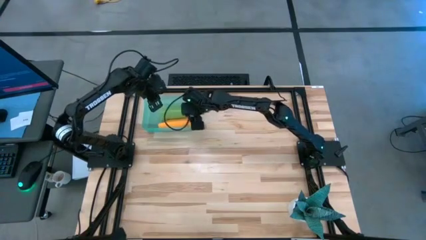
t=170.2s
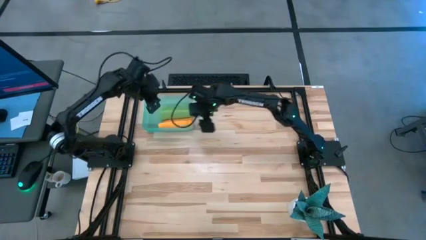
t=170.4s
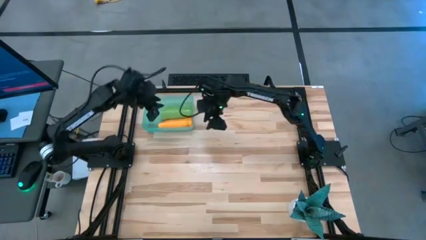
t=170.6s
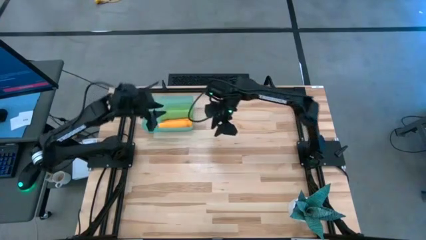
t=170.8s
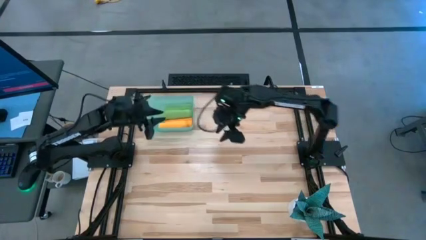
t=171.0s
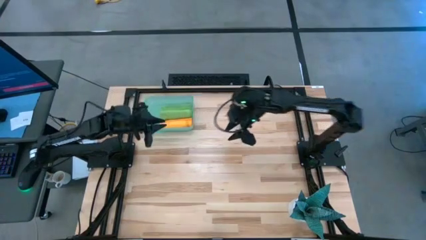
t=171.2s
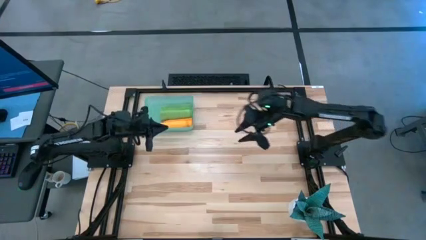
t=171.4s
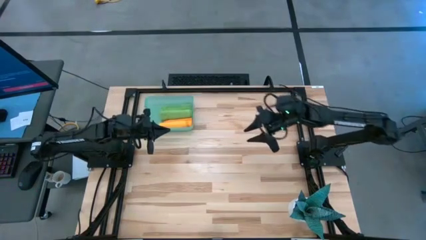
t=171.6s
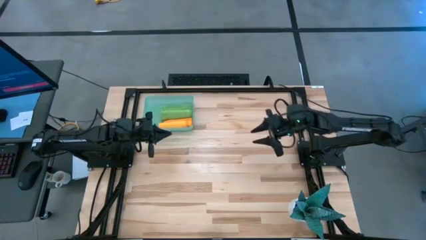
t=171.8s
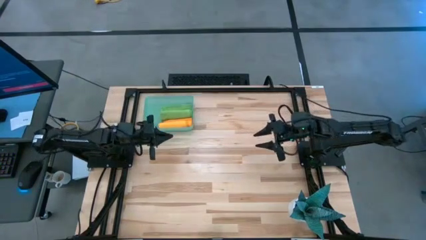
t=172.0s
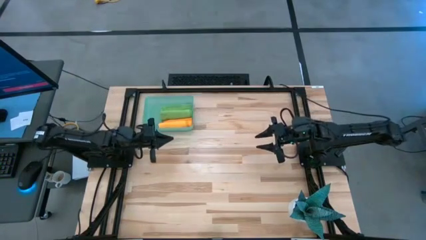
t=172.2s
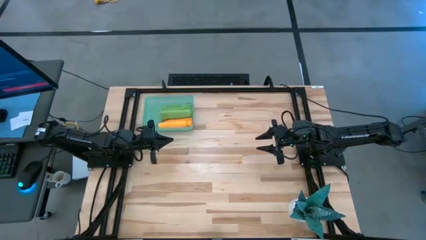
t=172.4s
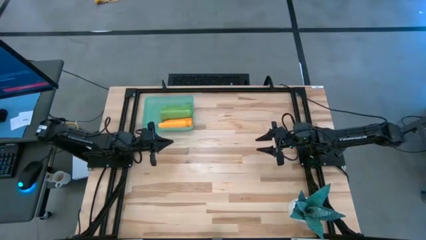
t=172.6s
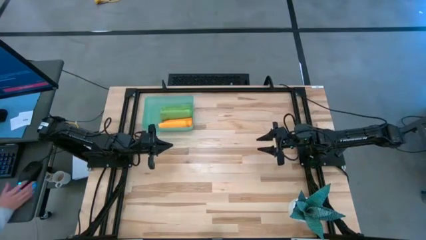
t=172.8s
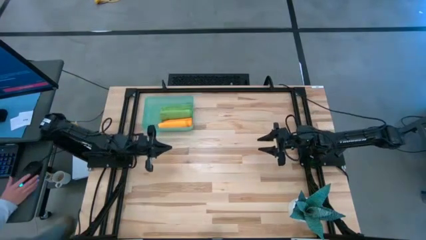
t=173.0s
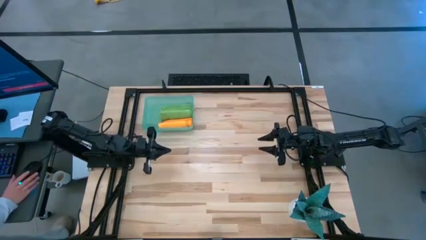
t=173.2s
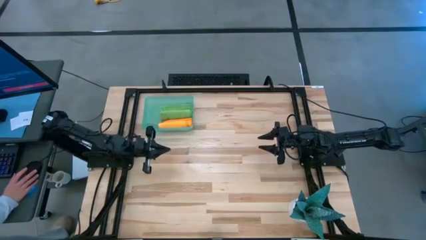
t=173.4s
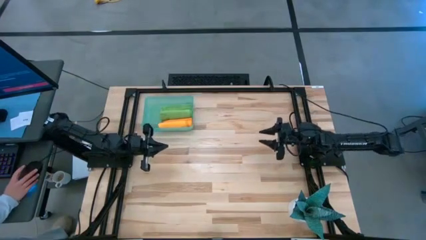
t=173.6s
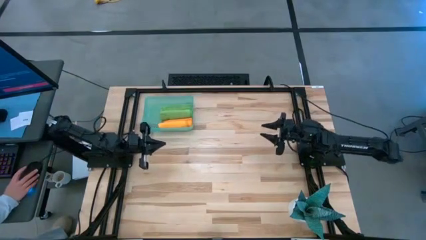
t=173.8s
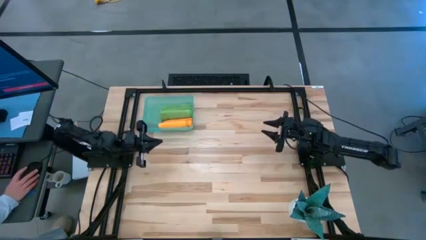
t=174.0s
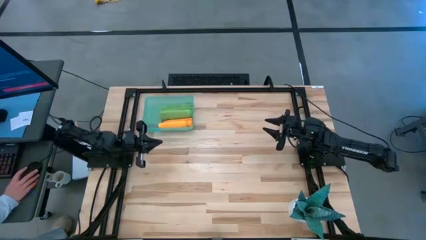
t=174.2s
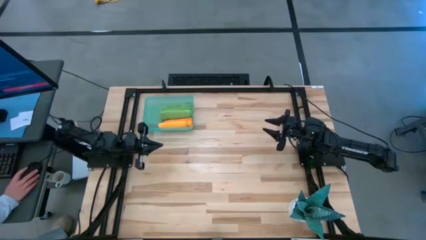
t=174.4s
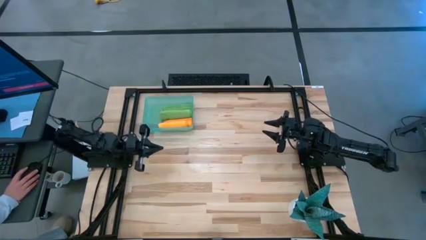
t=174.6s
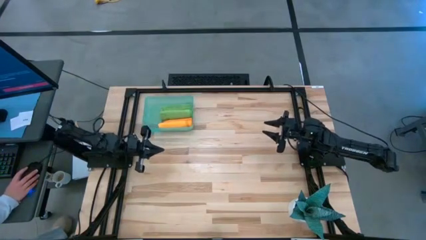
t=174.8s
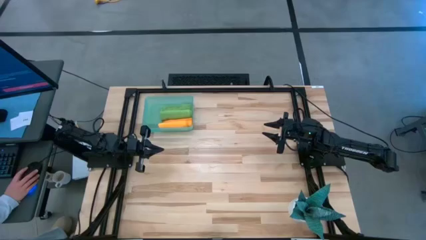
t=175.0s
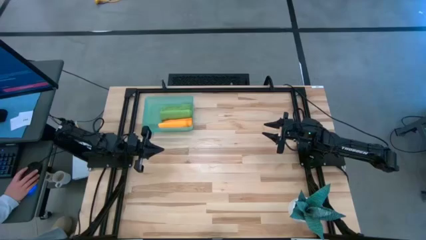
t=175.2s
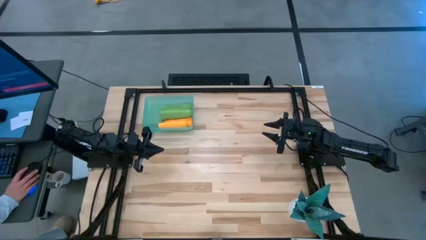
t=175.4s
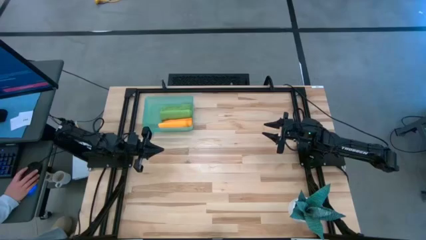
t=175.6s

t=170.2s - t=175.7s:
Task: Roll microfiber towels into tight, uniform cylinder then place into a basket
Return to Home Position

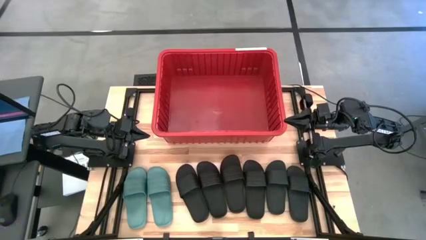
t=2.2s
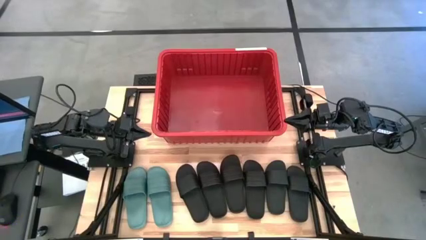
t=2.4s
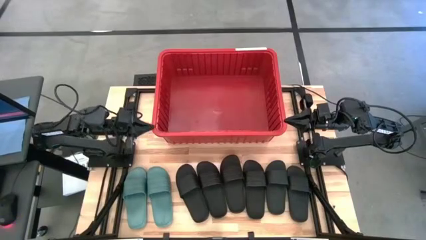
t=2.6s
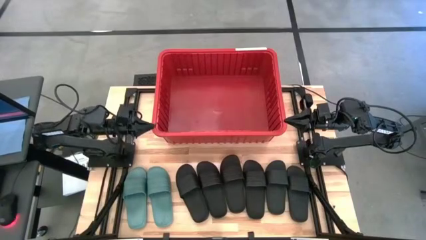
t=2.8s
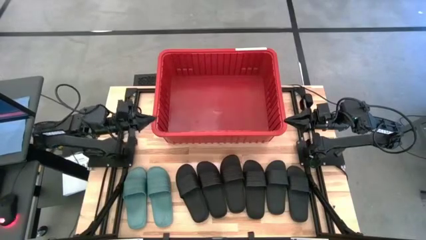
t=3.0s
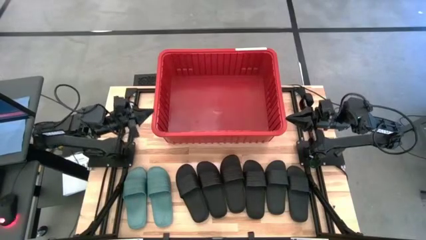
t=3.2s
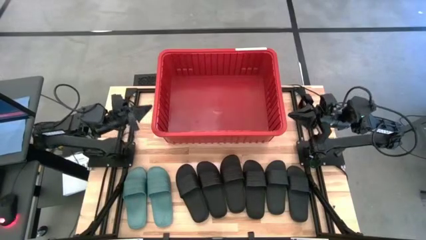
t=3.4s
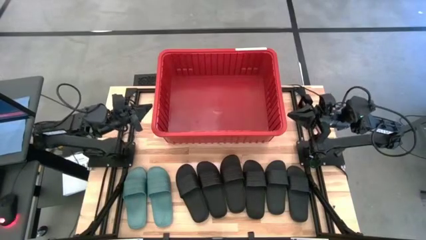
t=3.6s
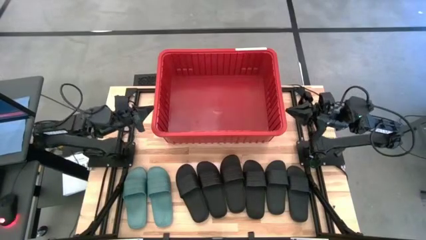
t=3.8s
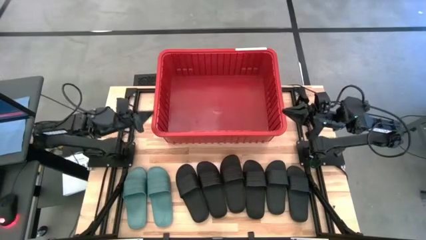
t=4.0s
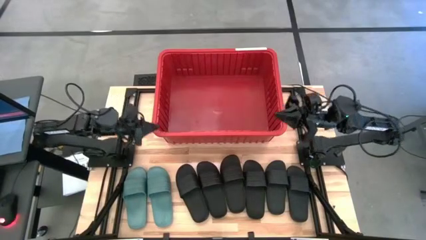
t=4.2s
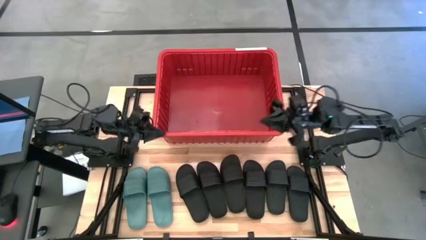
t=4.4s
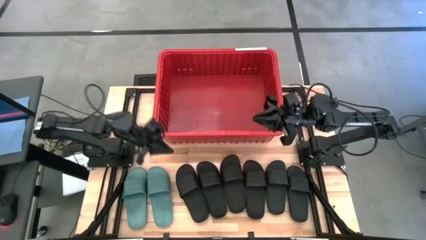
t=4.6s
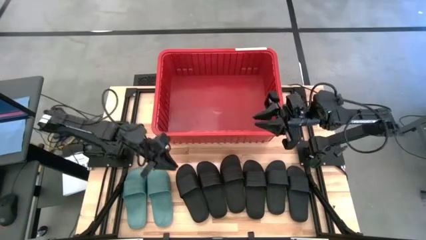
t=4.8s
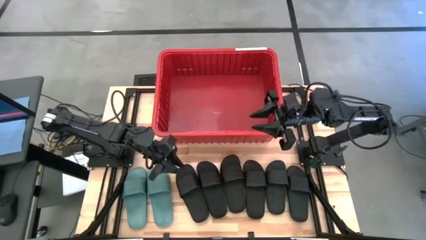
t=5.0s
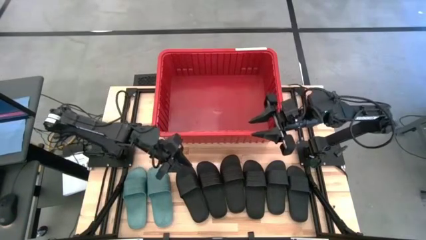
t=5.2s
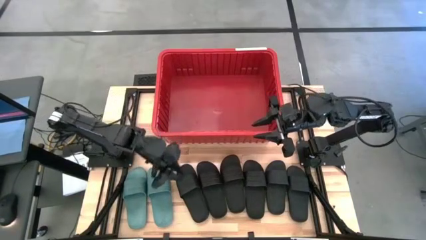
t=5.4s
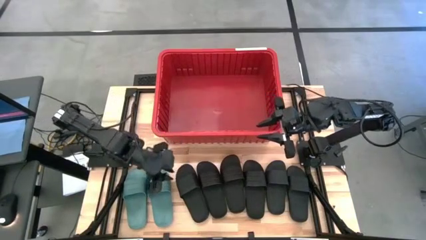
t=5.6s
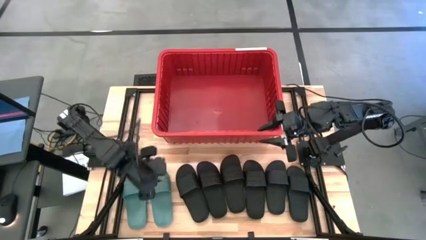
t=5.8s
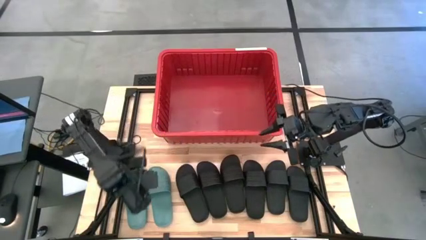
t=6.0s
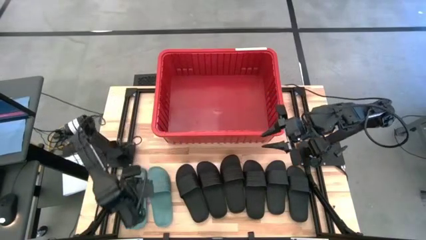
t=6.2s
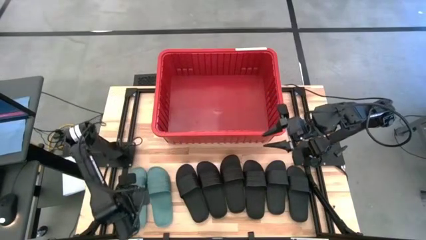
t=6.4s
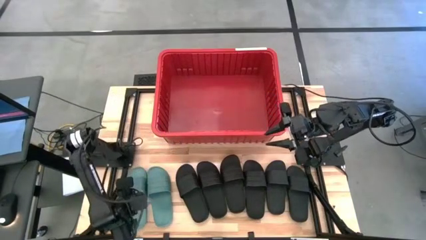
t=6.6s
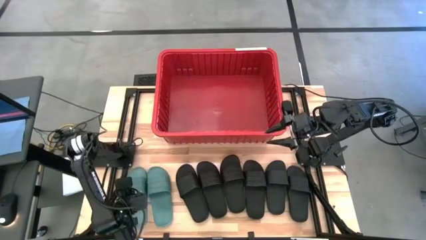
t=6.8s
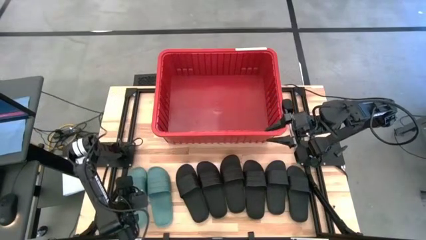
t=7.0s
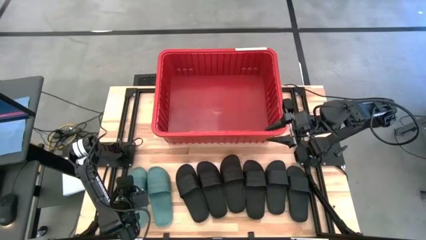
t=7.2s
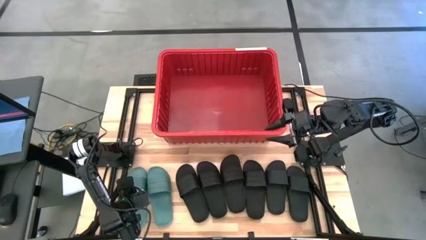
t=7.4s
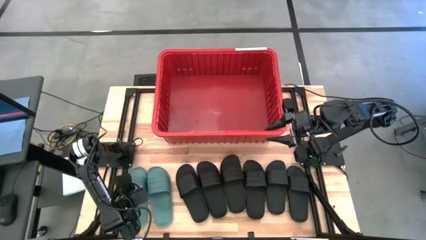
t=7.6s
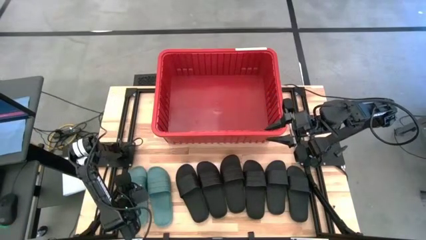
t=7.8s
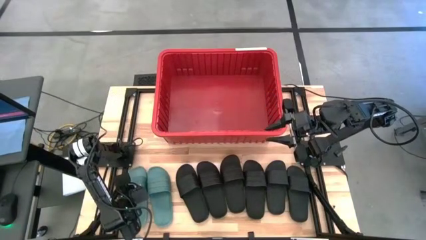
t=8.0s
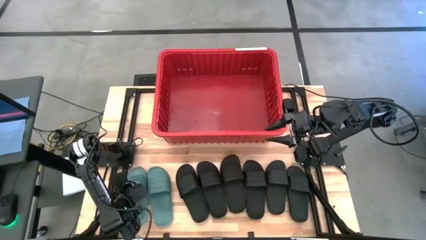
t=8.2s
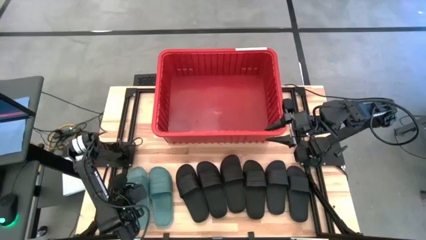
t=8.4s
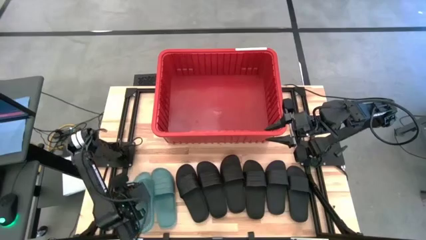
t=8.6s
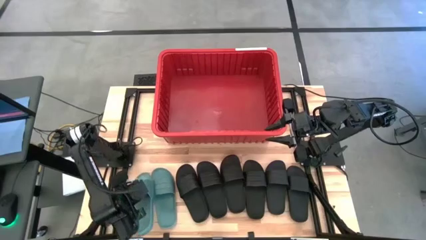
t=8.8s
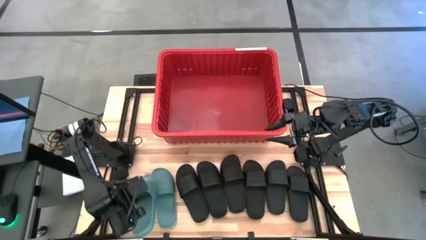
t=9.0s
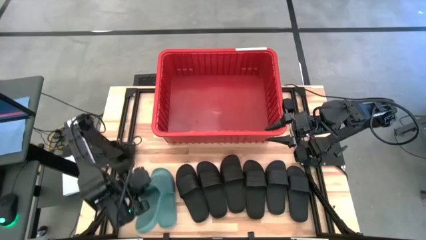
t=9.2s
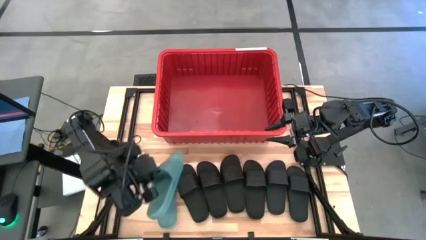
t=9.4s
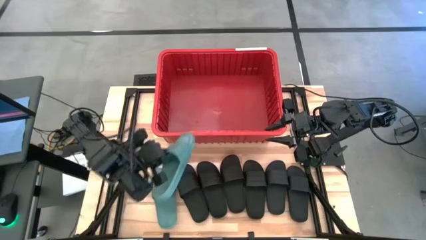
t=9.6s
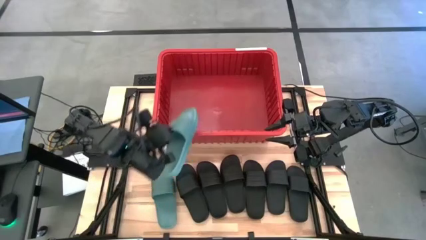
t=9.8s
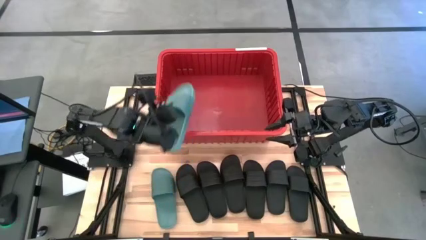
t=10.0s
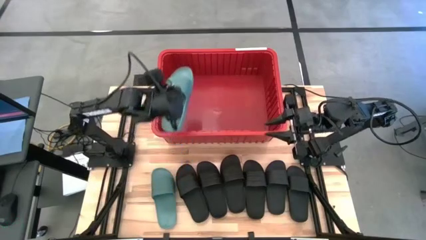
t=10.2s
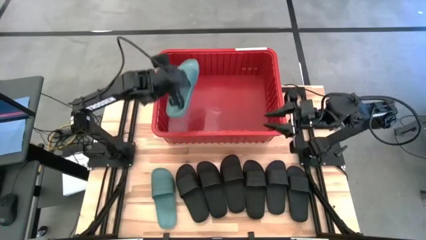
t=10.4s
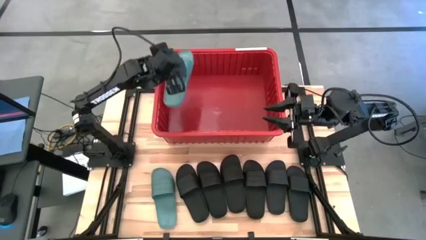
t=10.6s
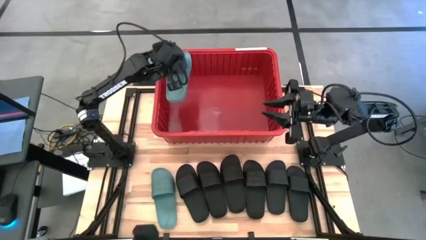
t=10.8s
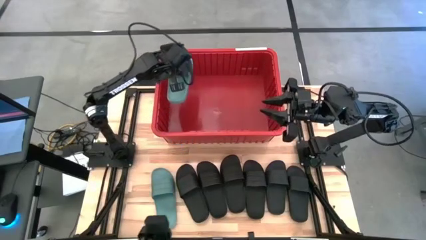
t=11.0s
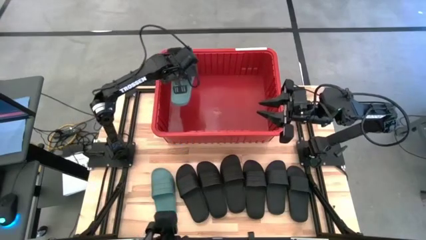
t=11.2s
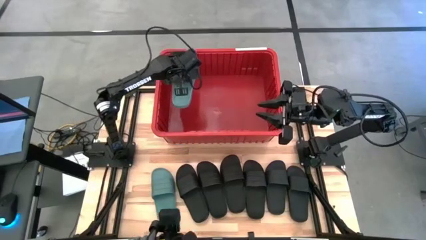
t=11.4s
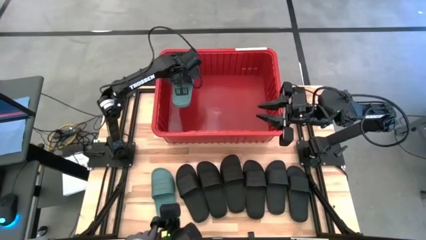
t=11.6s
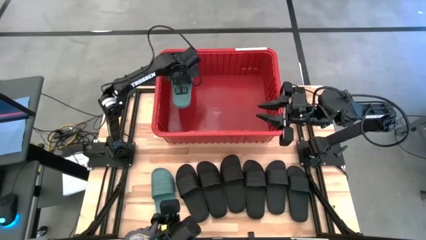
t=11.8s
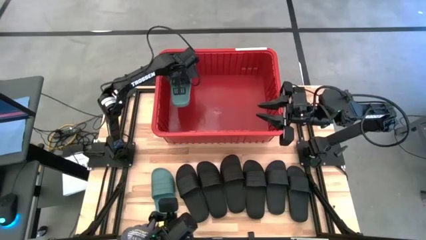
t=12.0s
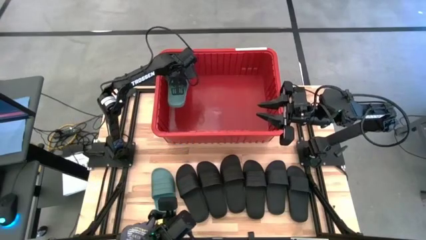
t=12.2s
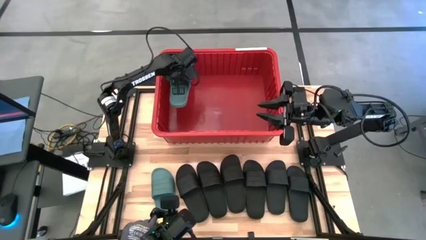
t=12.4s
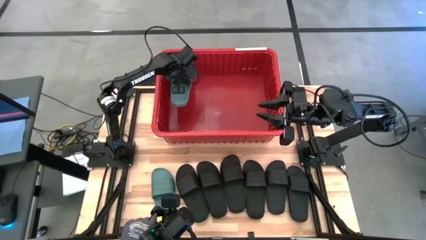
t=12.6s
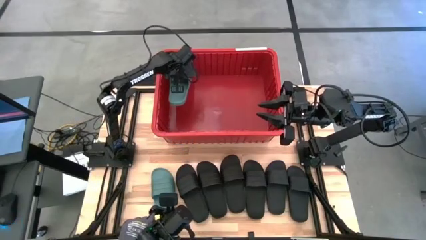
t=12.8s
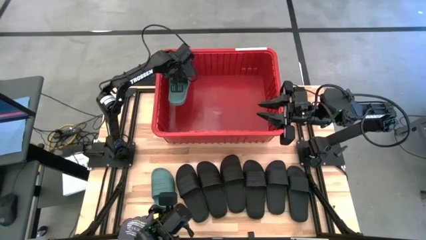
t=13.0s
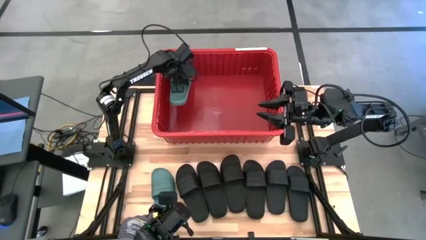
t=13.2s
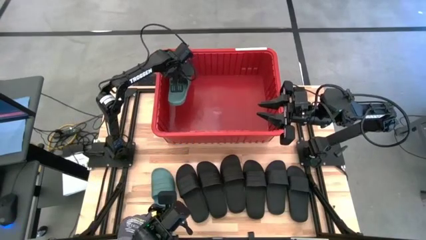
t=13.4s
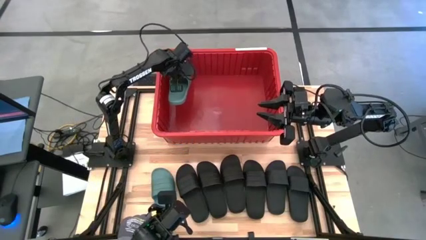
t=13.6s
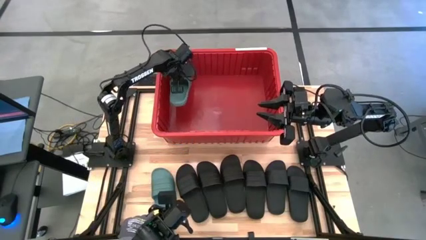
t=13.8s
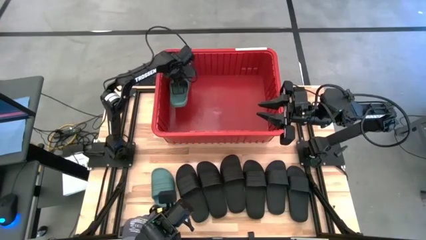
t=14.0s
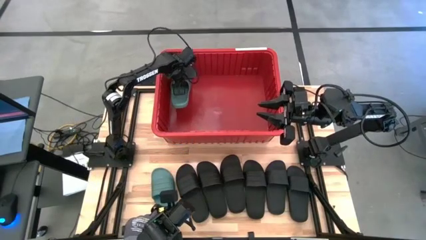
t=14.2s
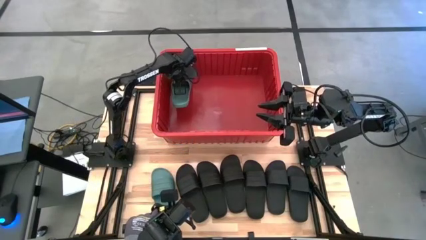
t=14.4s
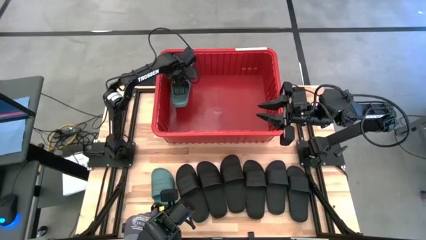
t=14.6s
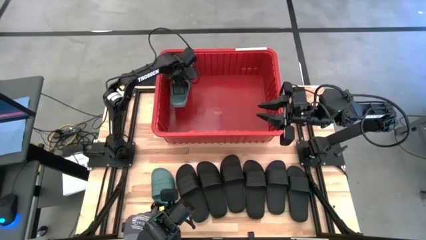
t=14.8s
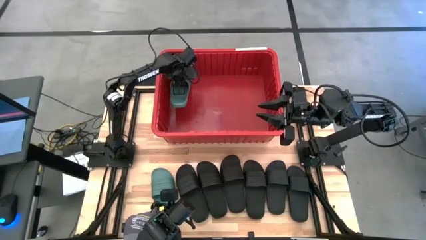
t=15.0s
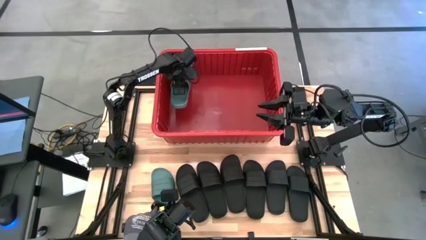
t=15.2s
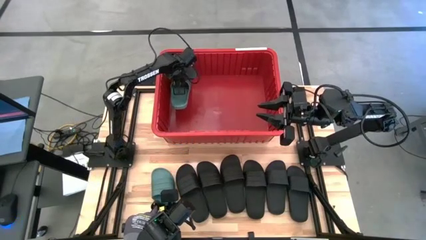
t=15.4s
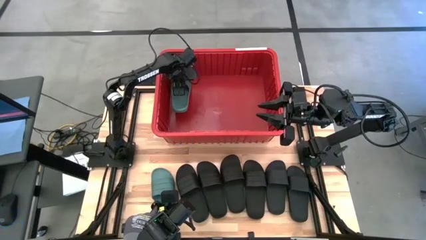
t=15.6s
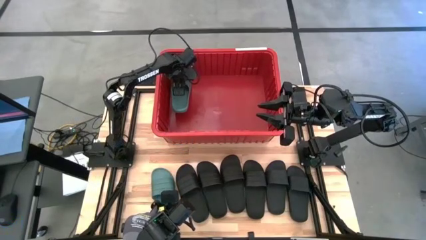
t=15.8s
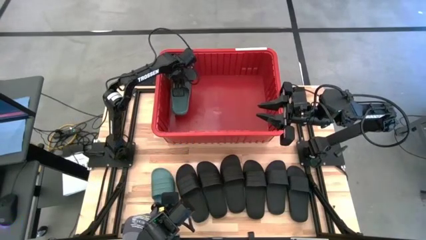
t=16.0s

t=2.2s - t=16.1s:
Task: Pick and place slides into bin
Put the green slide into the red bin
